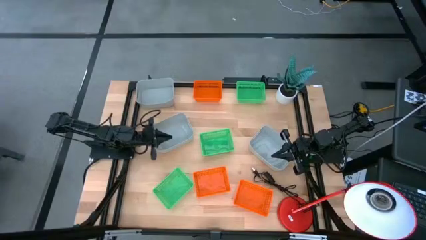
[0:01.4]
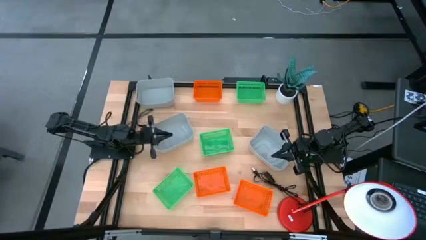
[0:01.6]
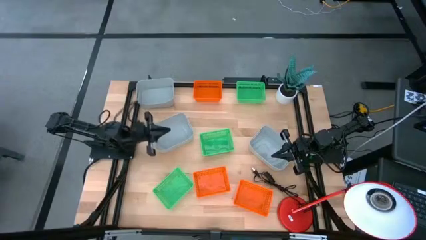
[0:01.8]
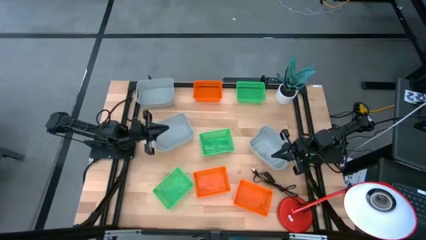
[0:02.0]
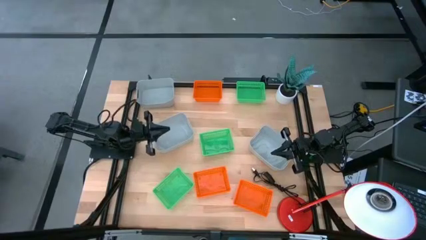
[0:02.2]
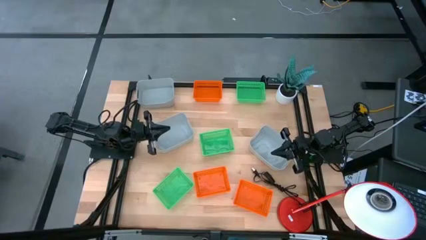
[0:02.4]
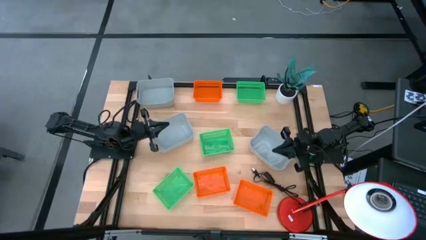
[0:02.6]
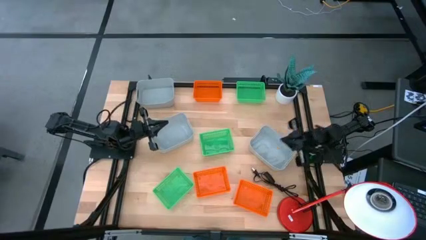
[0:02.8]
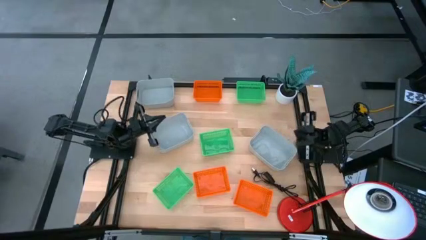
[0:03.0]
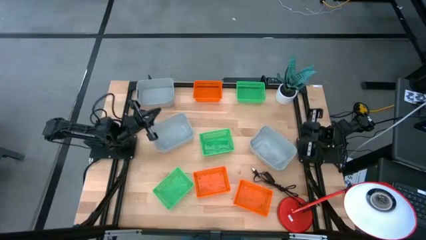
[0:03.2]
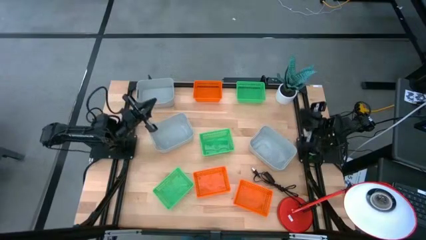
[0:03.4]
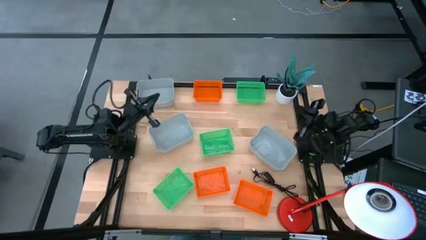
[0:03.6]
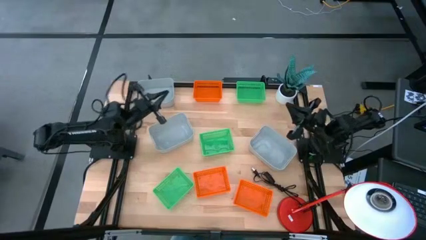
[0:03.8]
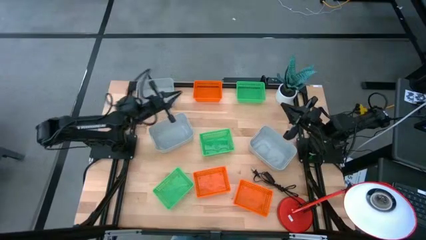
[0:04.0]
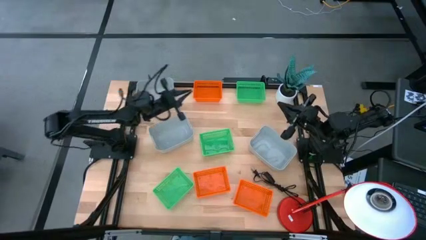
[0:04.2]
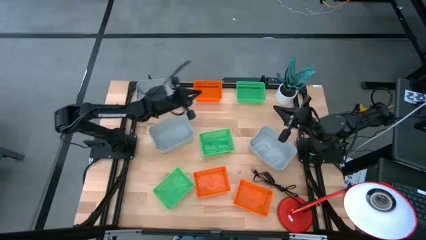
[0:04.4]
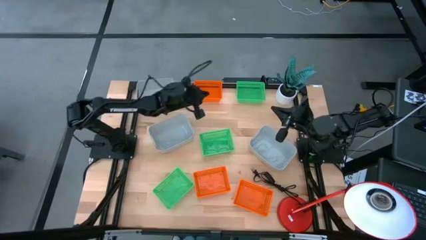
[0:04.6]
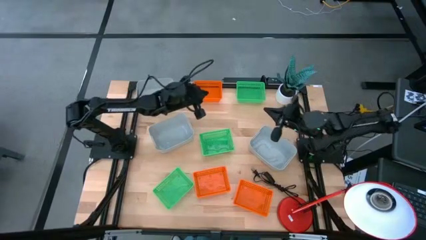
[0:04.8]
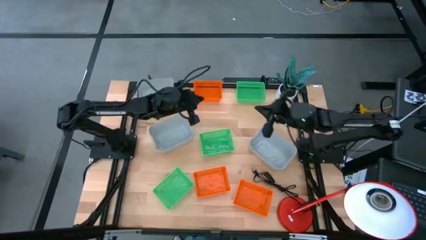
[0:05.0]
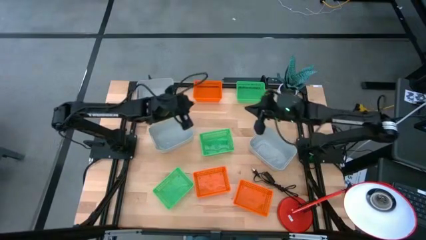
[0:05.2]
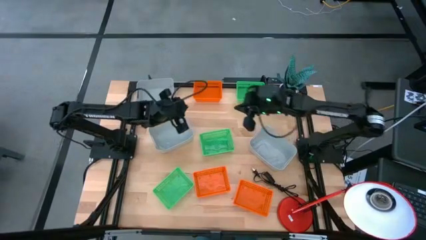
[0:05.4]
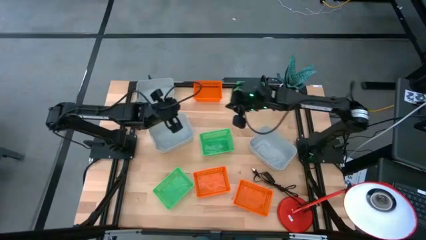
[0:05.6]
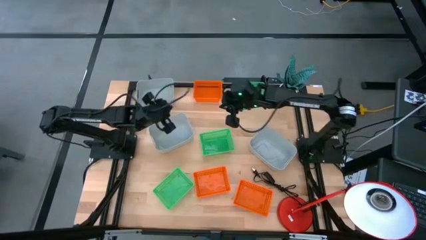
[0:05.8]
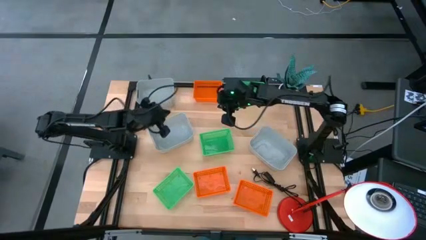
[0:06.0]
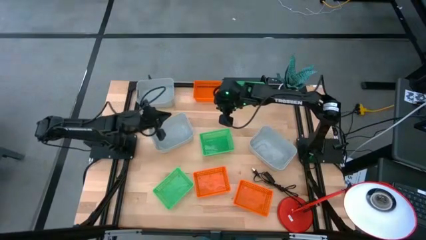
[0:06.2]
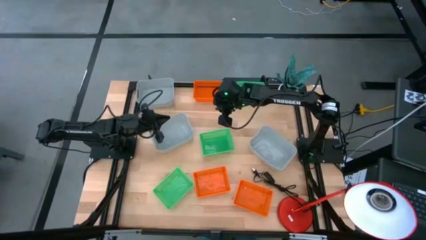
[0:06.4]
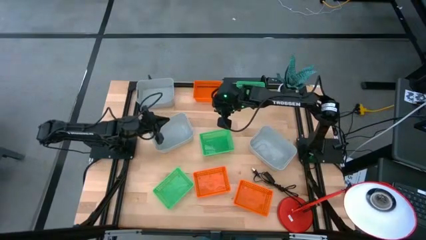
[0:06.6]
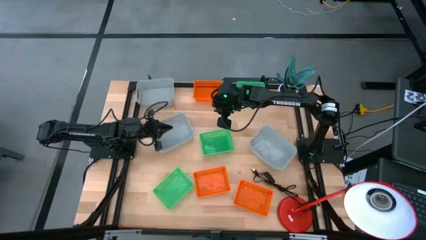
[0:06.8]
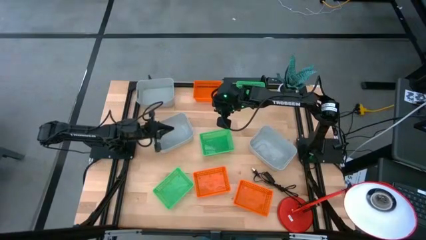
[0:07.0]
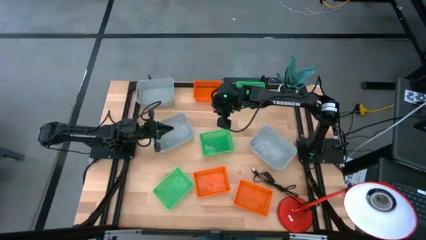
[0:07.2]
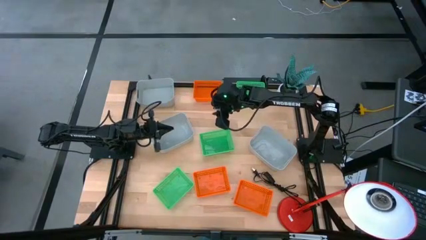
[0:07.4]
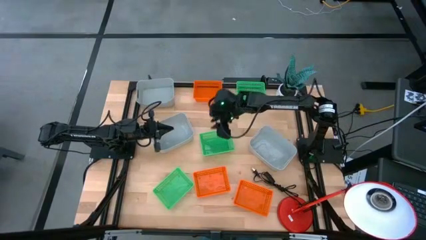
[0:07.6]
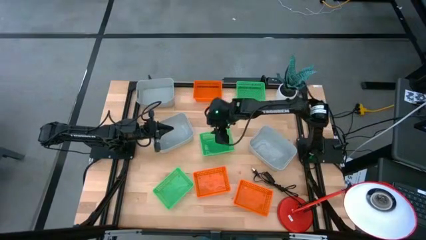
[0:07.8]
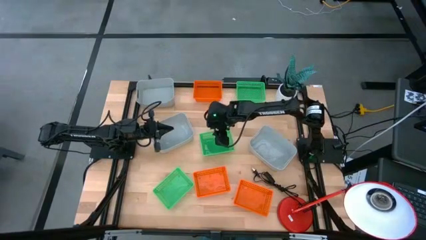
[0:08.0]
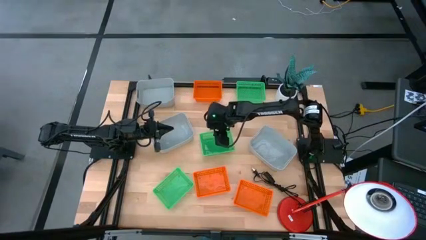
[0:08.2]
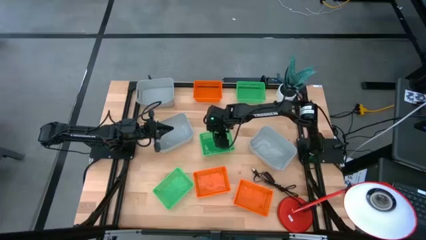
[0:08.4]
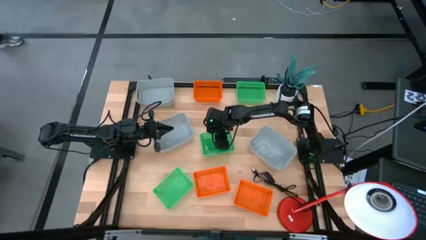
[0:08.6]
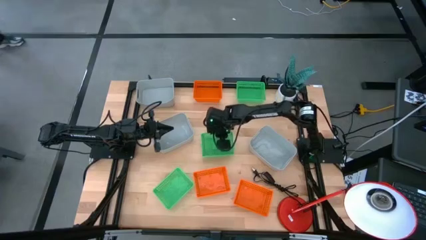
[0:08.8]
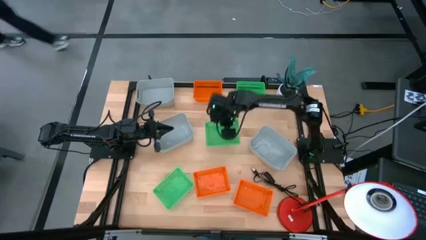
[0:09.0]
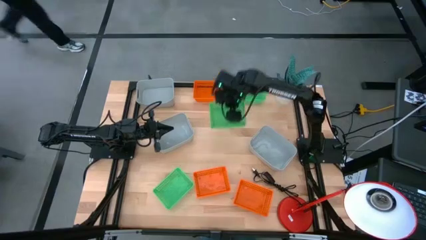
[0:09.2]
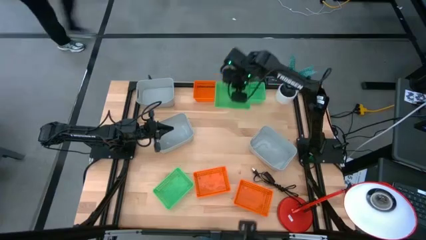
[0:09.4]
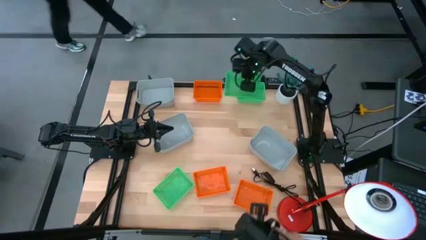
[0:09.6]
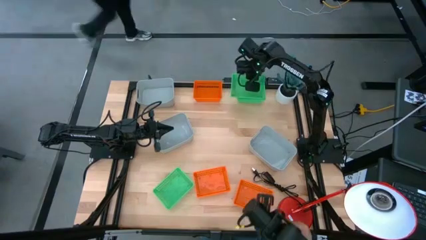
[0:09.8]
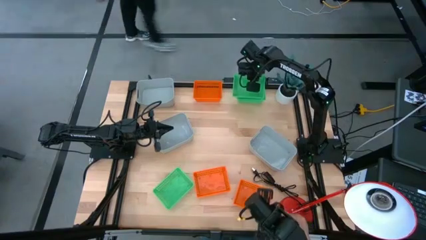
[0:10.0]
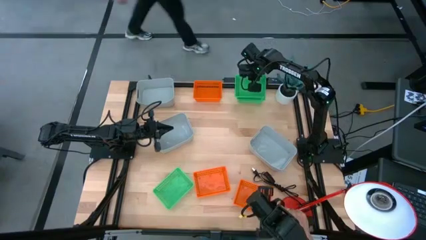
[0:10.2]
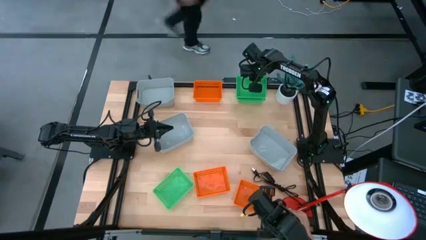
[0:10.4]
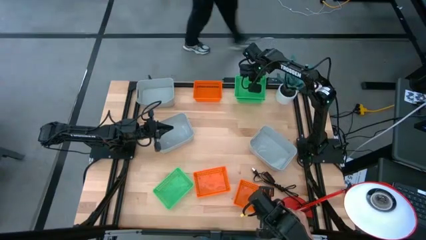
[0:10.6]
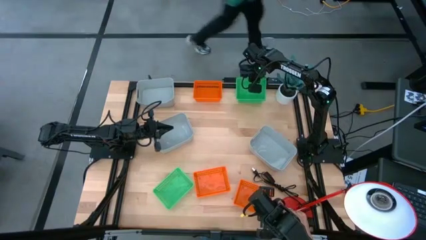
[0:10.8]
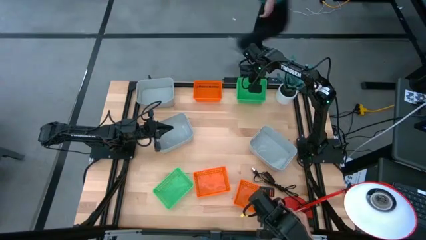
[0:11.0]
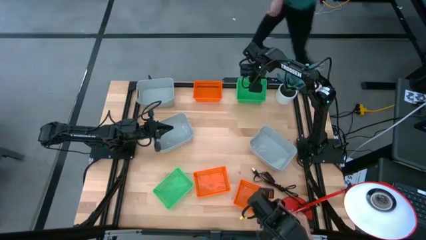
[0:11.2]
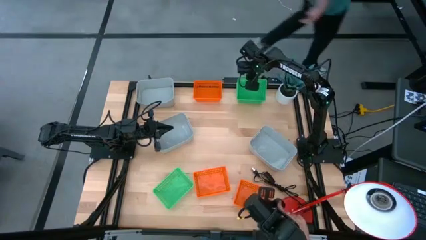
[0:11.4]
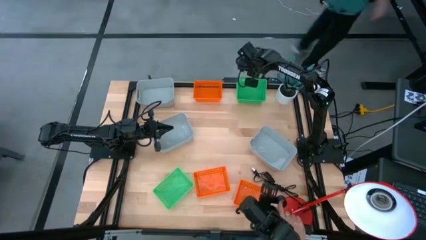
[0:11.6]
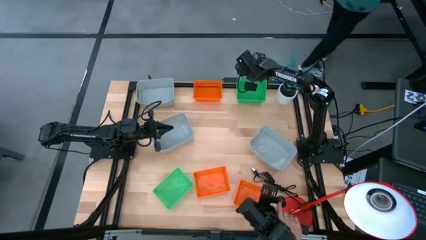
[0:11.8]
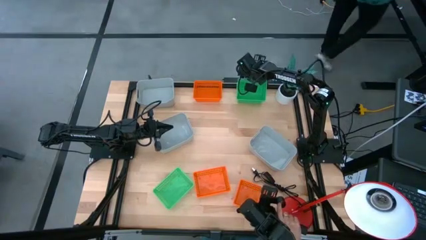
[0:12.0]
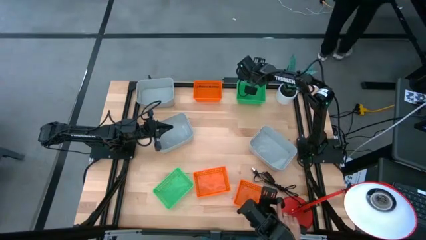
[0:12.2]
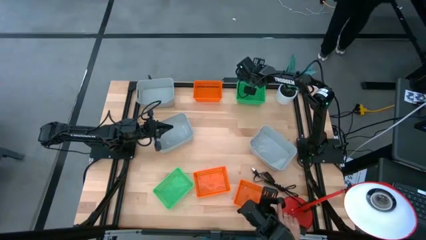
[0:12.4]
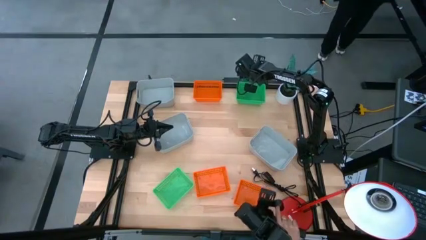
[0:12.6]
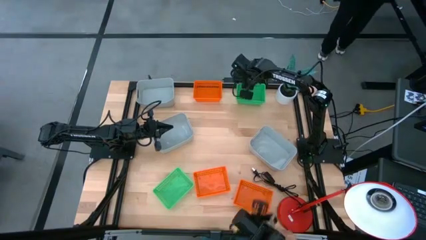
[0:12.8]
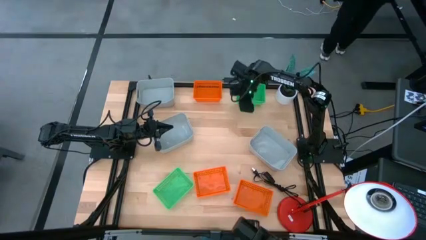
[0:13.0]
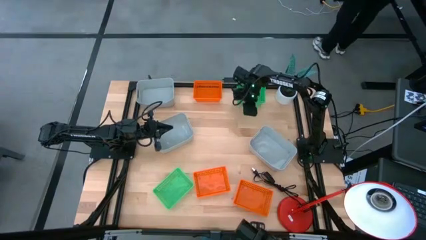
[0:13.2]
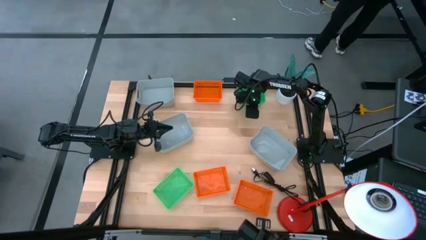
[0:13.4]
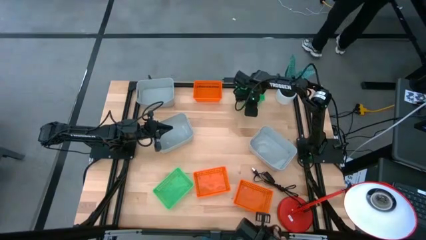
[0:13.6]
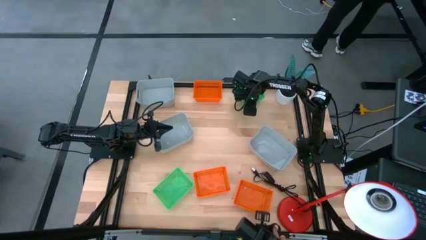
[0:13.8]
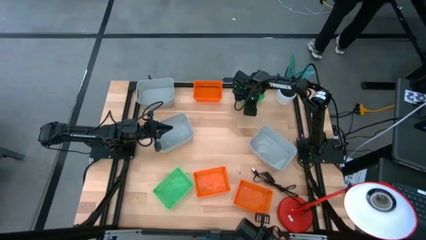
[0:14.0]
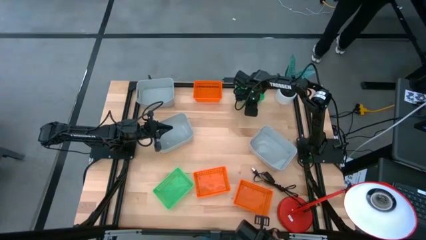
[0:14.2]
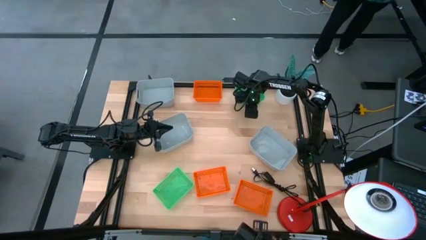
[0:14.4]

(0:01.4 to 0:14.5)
Stack the middle green bin on top of the top green bin
